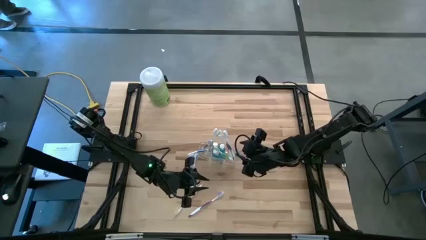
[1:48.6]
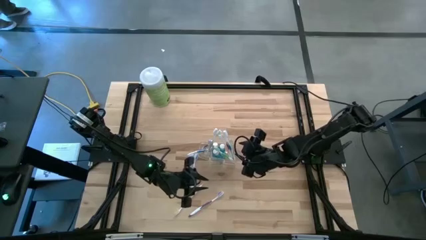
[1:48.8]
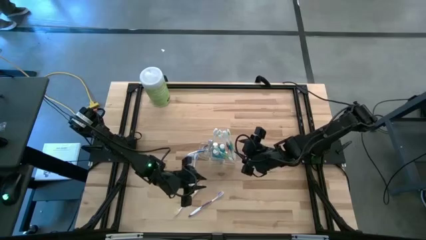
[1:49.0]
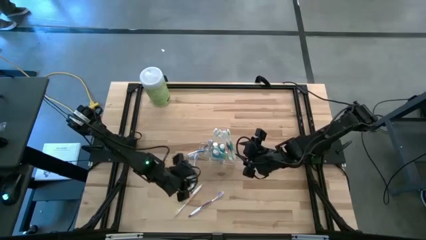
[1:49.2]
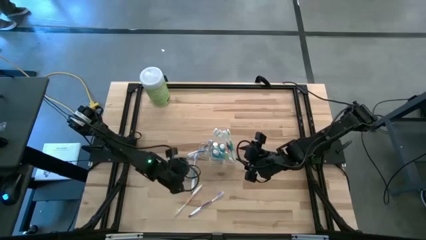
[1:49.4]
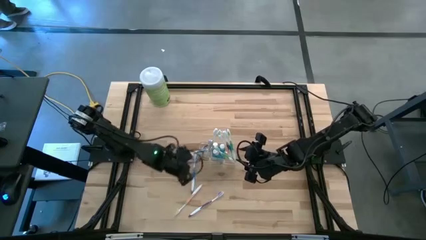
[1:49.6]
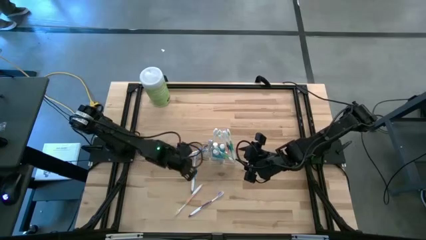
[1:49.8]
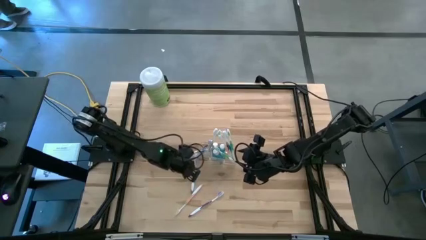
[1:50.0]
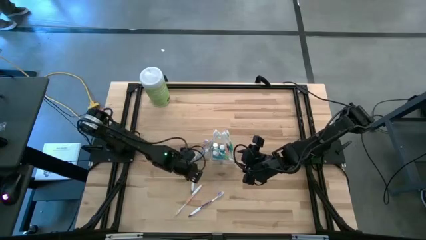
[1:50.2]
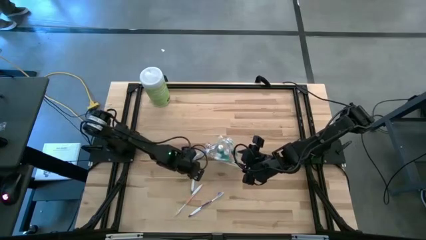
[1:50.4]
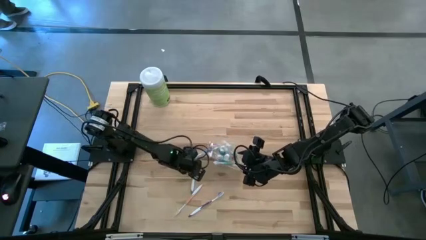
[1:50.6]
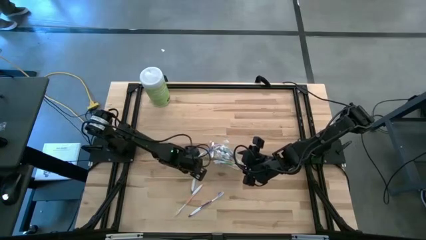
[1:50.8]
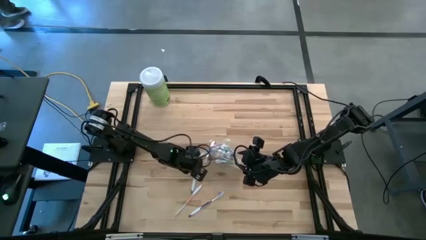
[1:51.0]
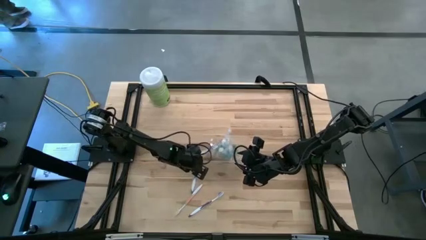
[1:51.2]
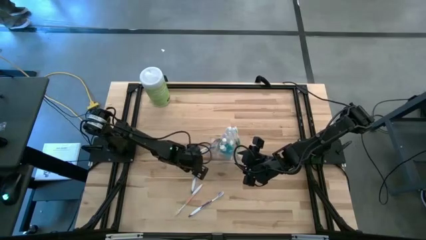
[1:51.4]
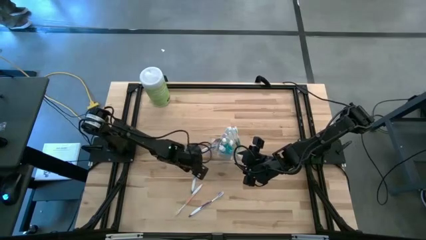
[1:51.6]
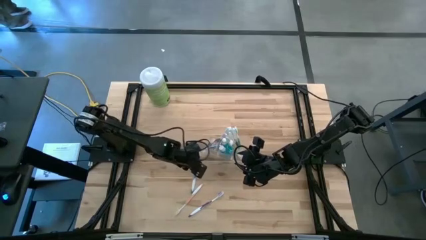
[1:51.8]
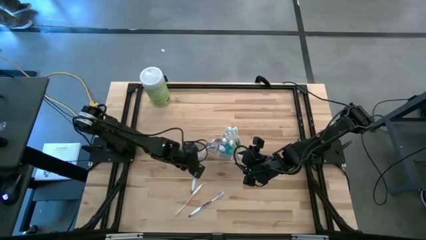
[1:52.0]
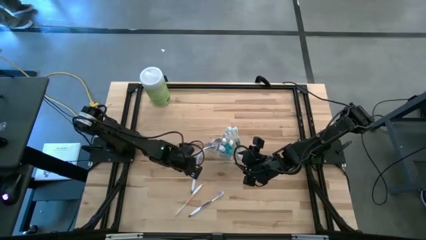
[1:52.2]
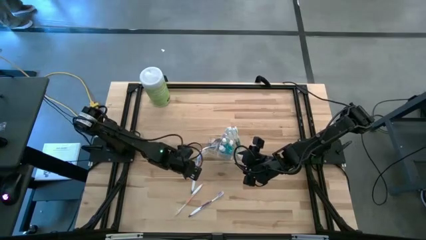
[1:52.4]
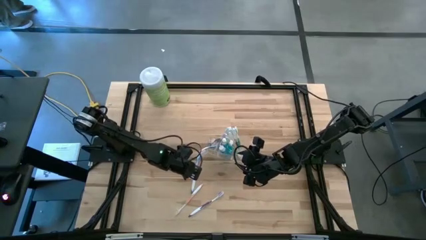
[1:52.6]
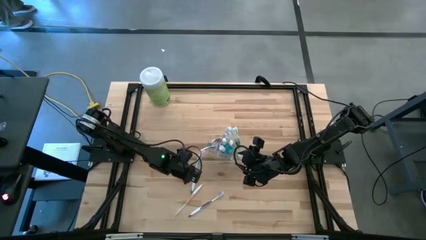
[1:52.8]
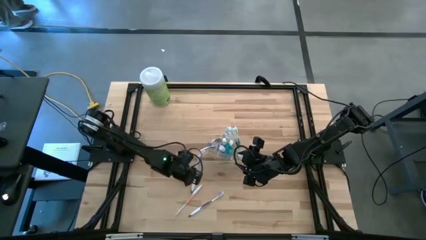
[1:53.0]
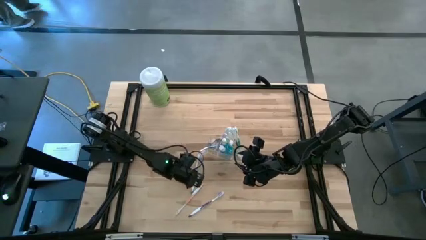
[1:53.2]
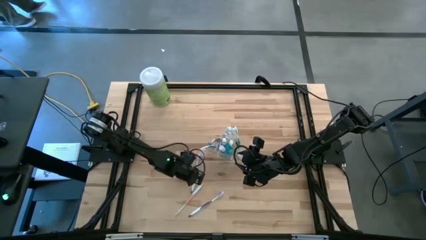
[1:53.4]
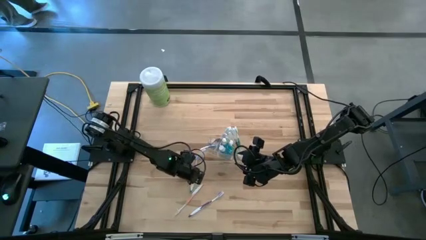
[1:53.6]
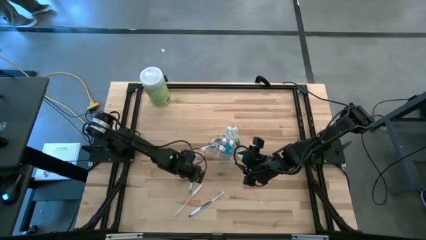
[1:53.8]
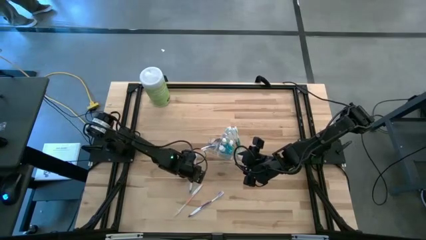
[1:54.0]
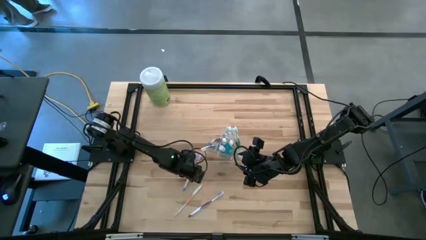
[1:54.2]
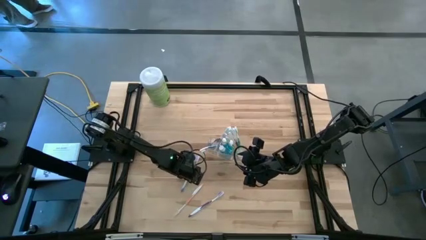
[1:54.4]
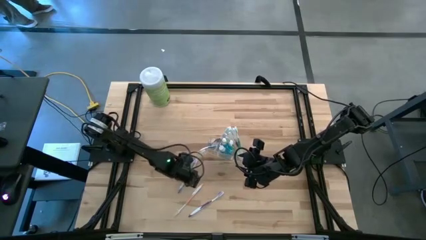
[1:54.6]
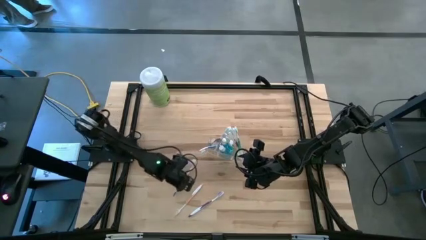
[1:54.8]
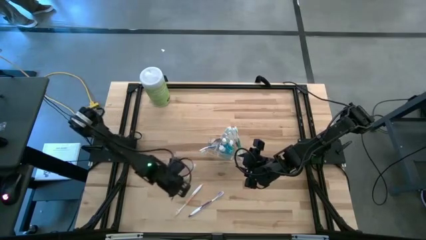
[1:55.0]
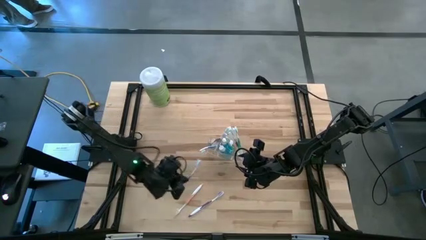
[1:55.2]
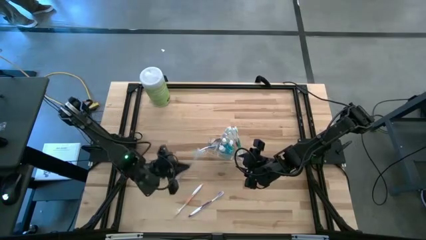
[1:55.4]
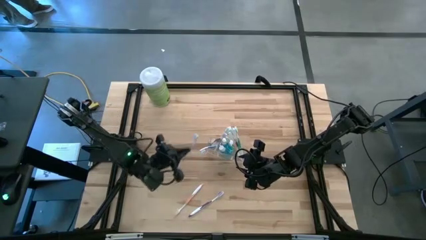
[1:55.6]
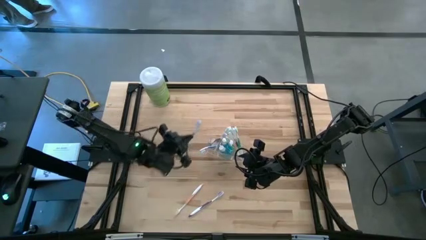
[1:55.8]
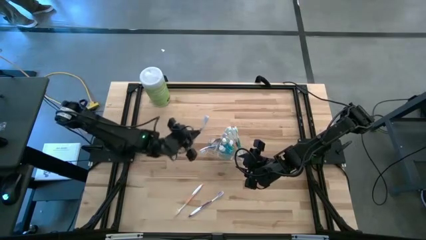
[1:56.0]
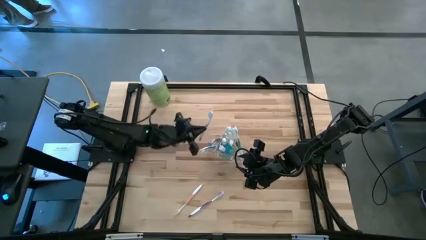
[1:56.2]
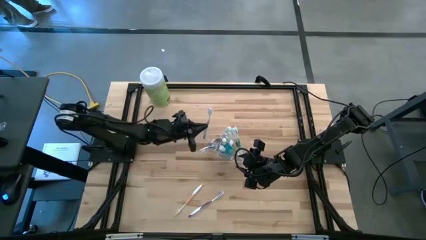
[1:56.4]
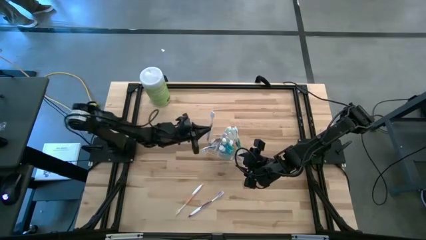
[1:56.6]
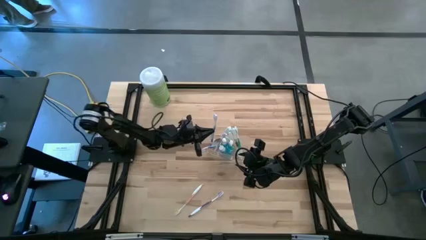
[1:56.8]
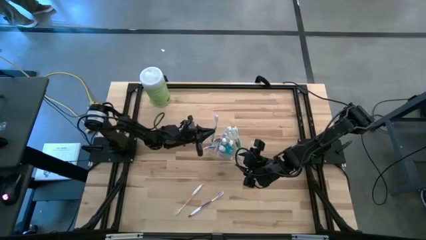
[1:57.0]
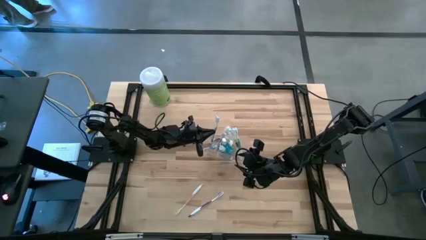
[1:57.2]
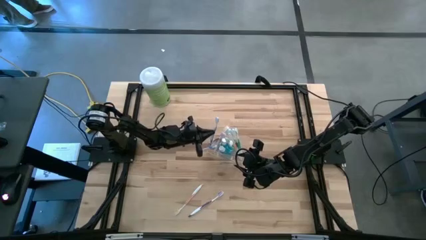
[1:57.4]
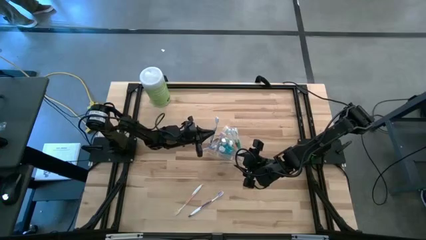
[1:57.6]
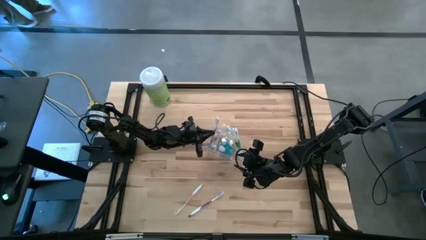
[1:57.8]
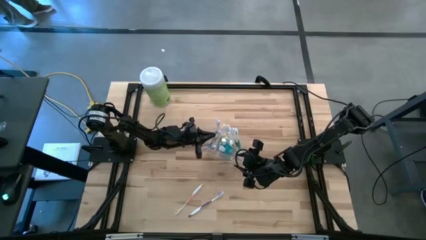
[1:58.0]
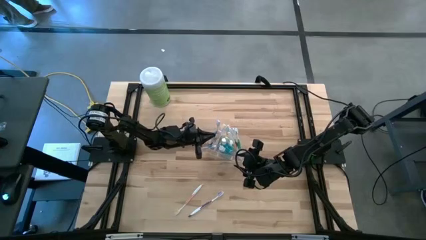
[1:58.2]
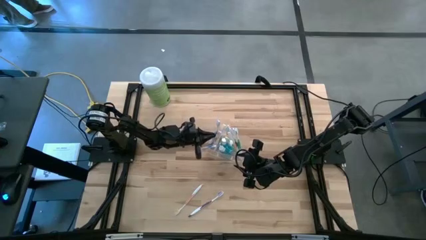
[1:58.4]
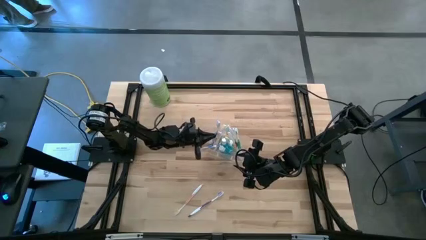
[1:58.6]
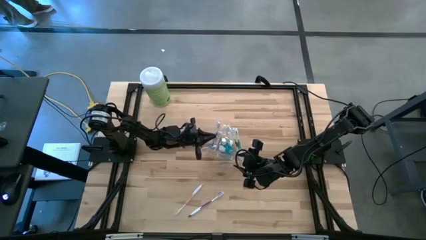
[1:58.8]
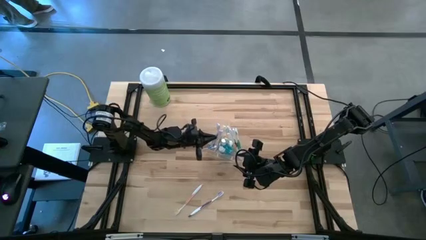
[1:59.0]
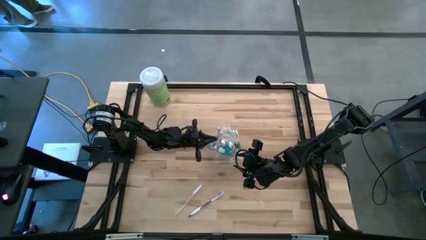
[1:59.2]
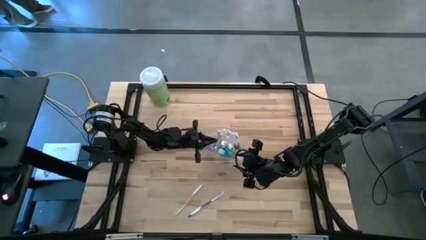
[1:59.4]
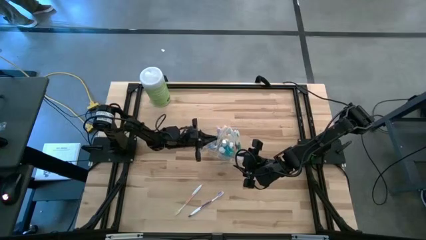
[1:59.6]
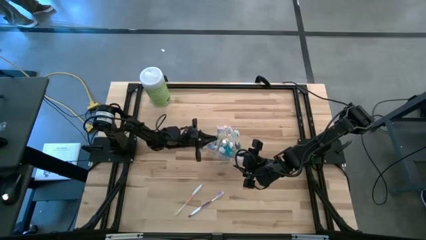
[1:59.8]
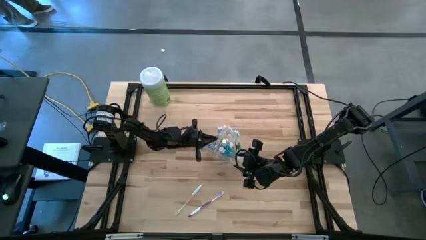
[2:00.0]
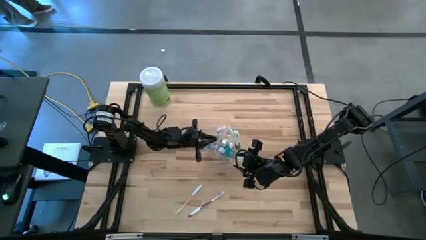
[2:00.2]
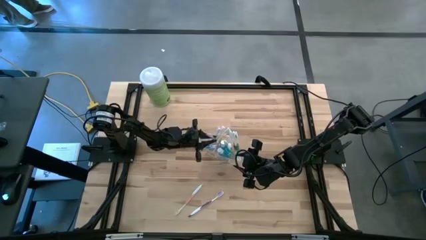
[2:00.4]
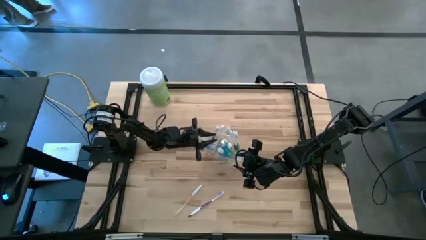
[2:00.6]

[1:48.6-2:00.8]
Task: Pick & Place toothbrushing station
Put the blue toothbrush into the transparent organizer
